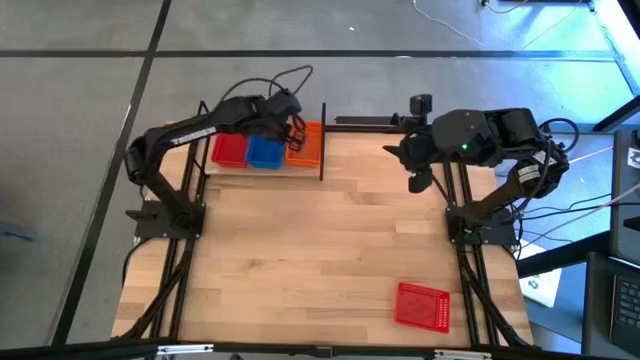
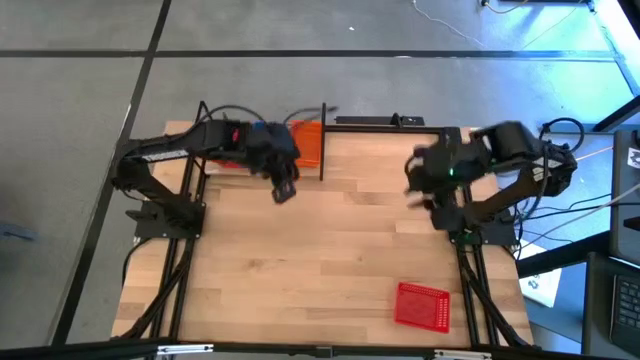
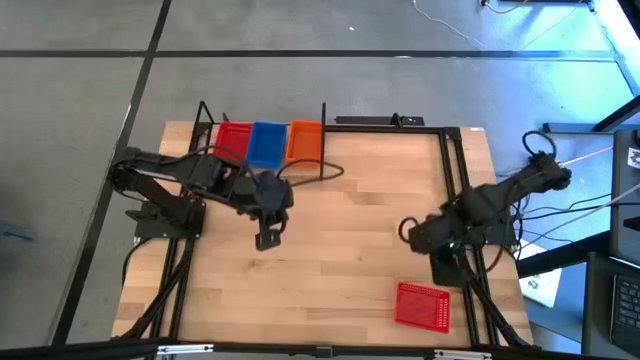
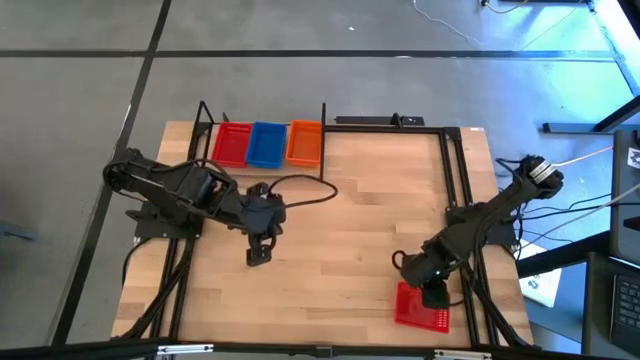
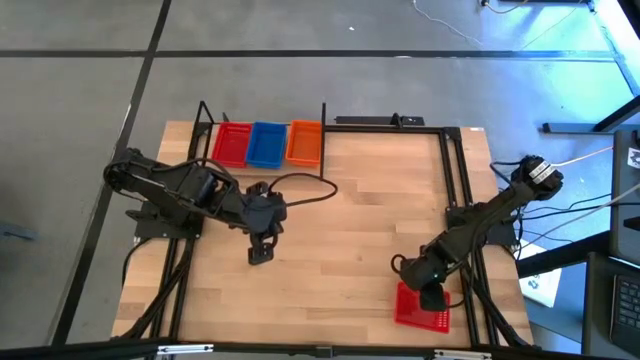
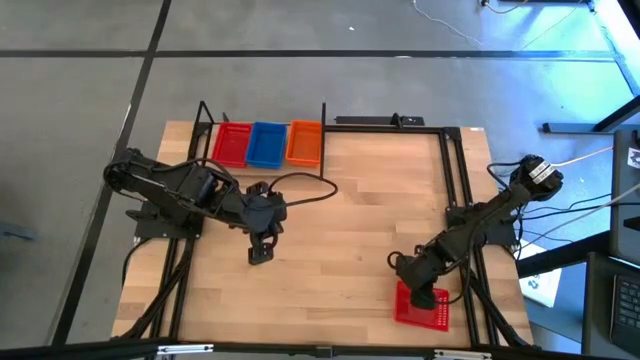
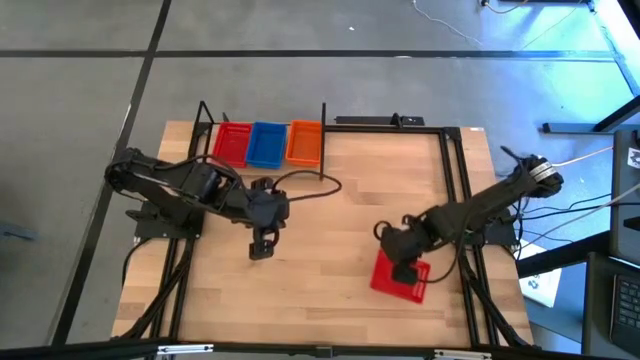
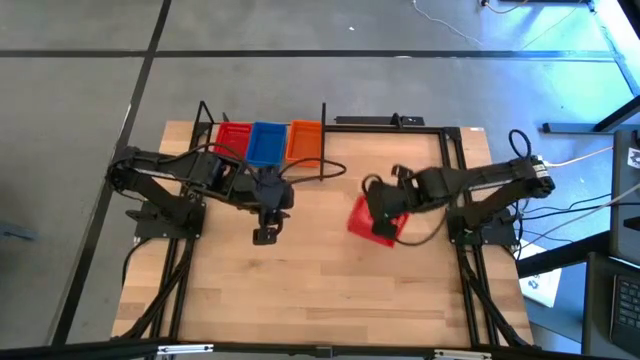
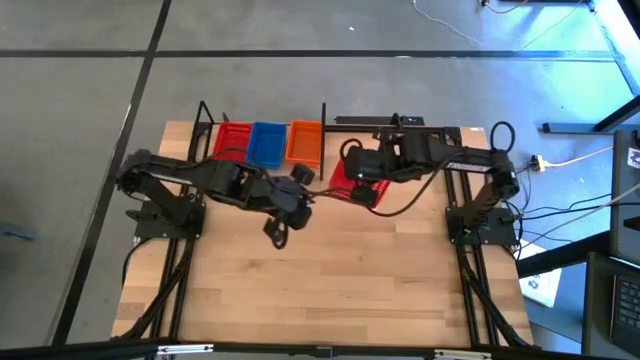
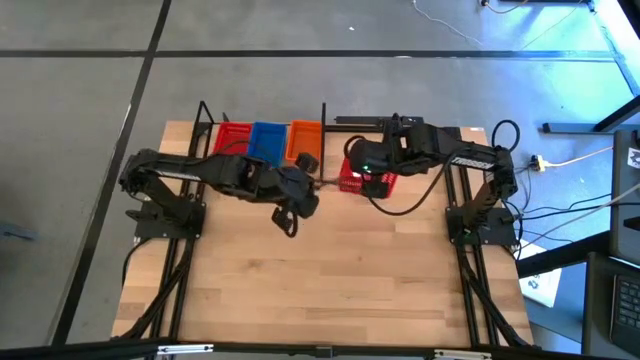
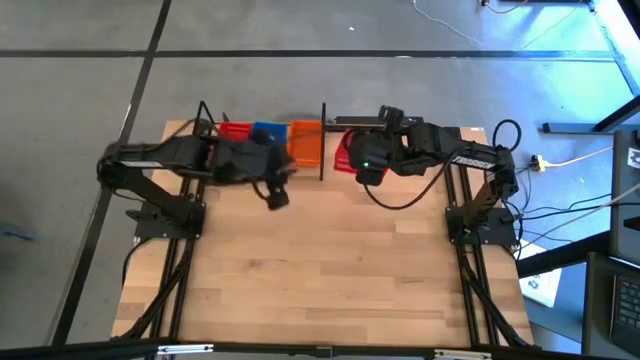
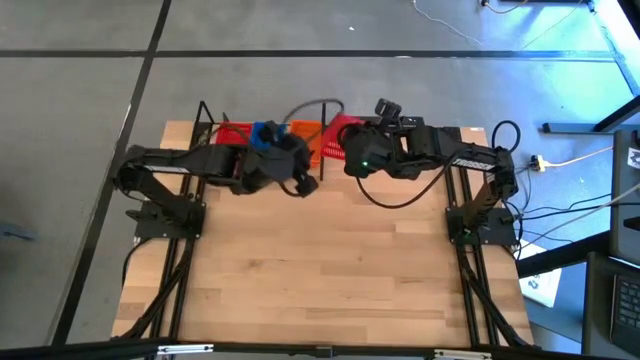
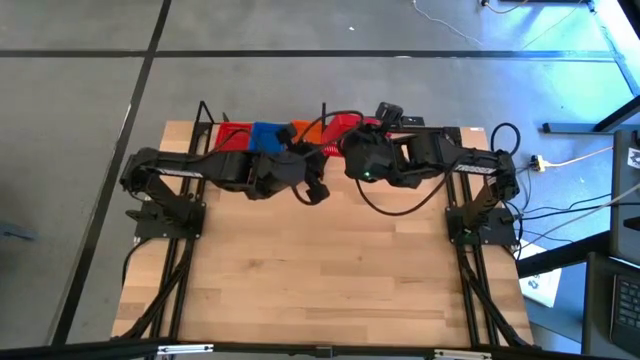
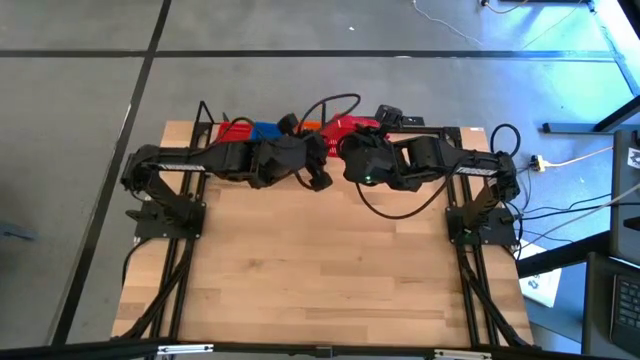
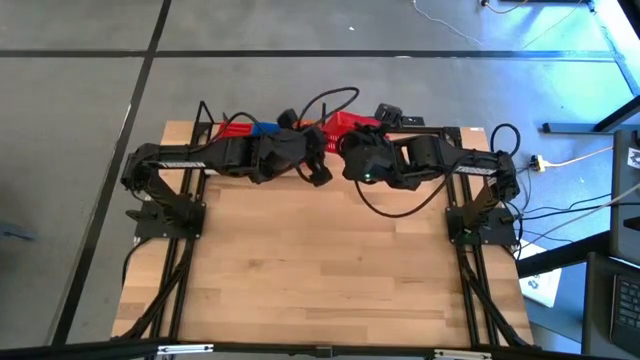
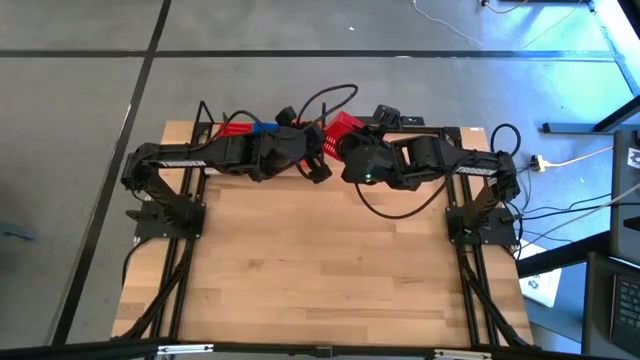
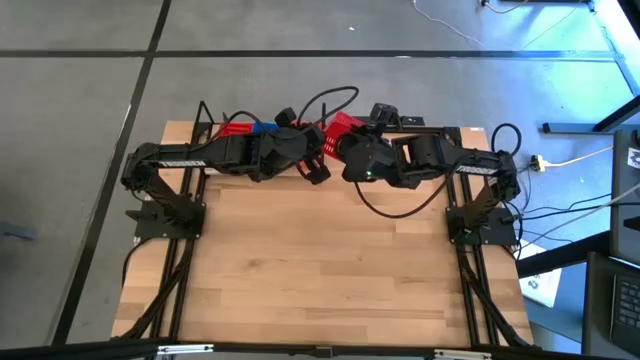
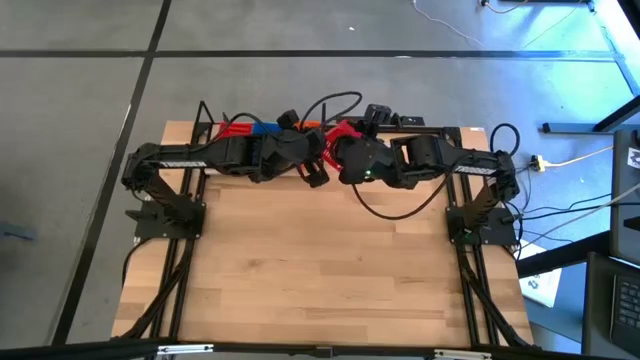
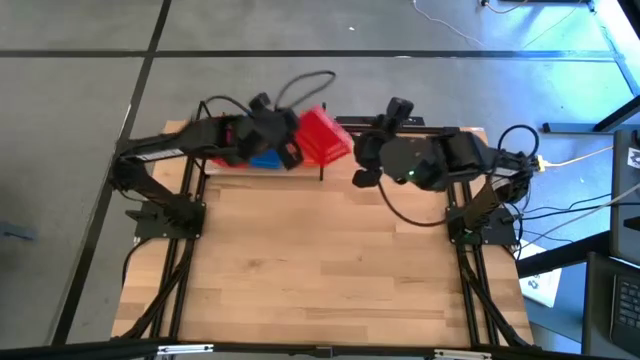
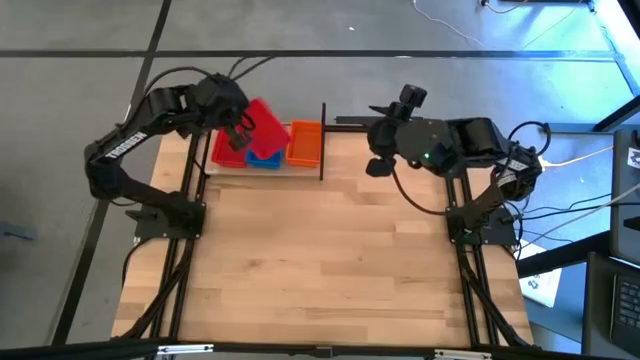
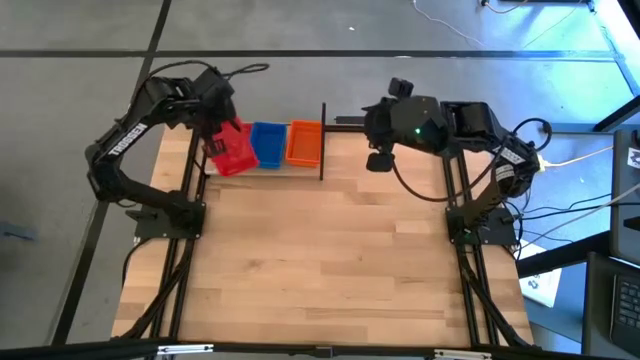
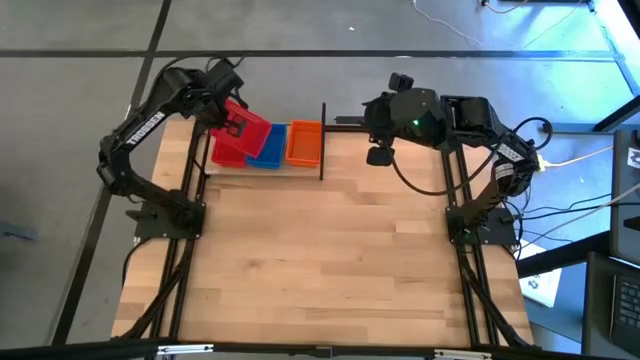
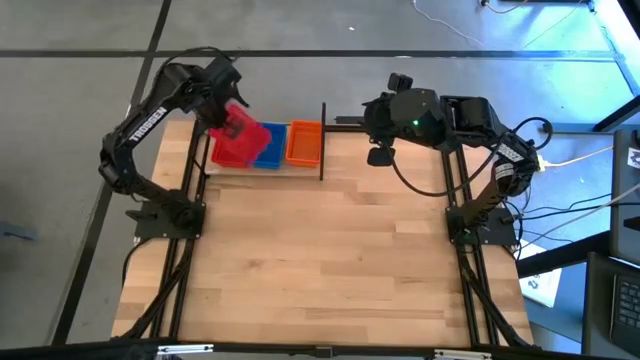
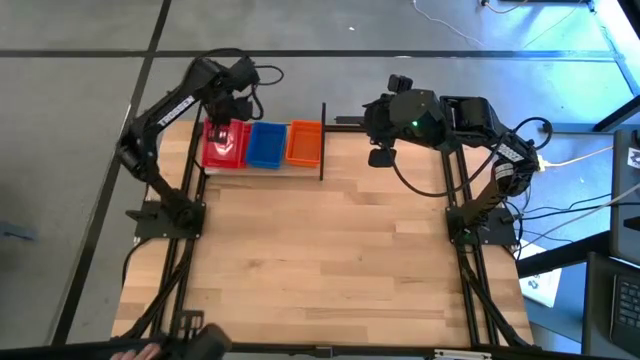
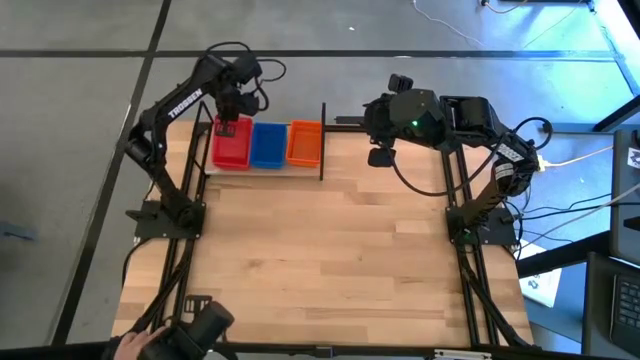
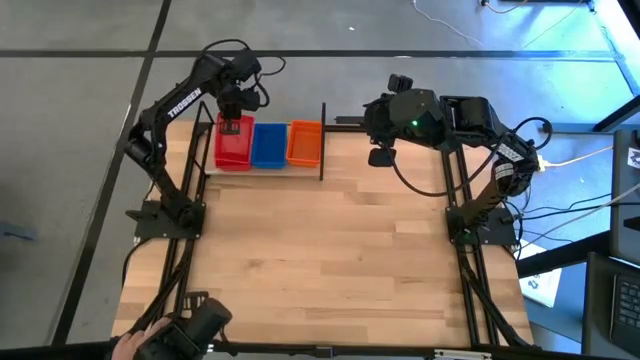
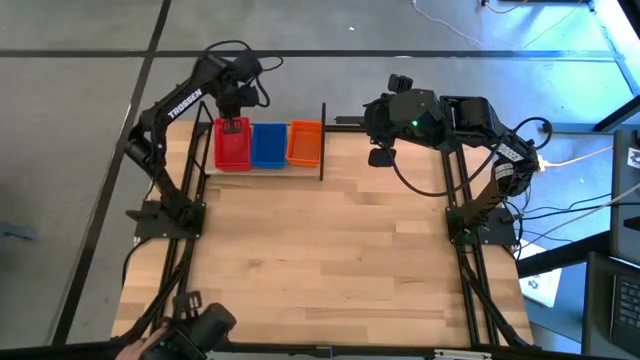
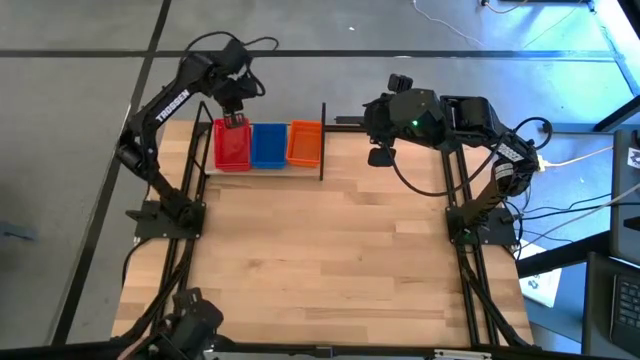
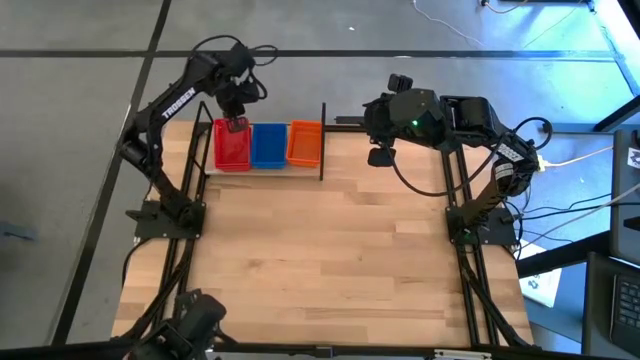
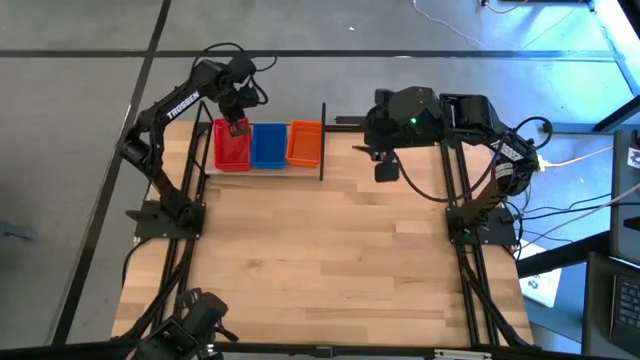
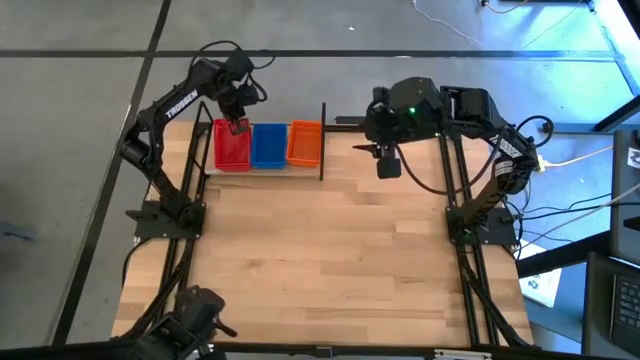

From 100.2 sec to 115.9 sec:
Task: Stack baskets on shelf by color
Stack the red bin on the red bins on the shelf

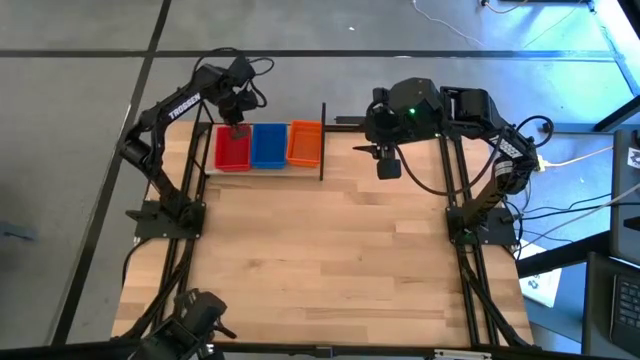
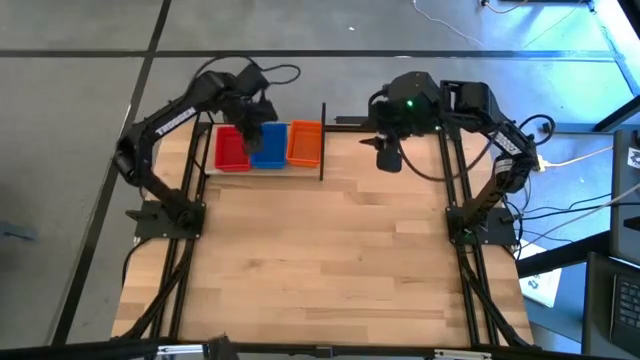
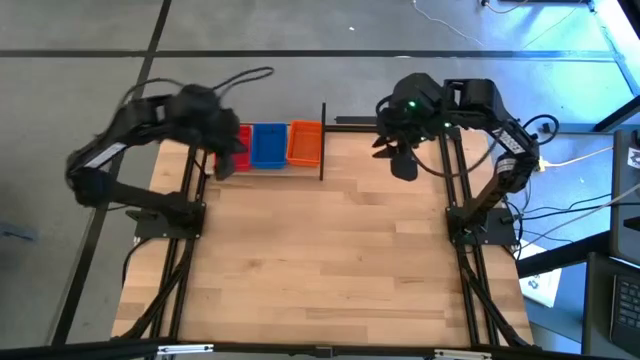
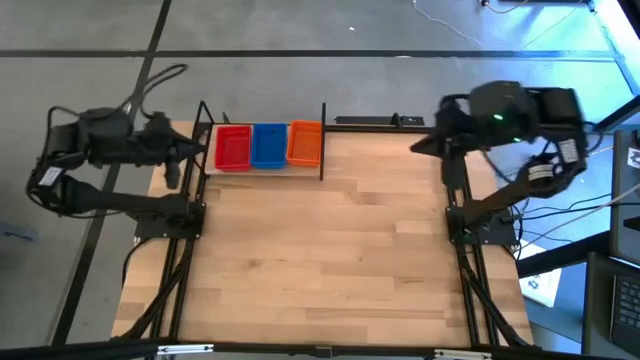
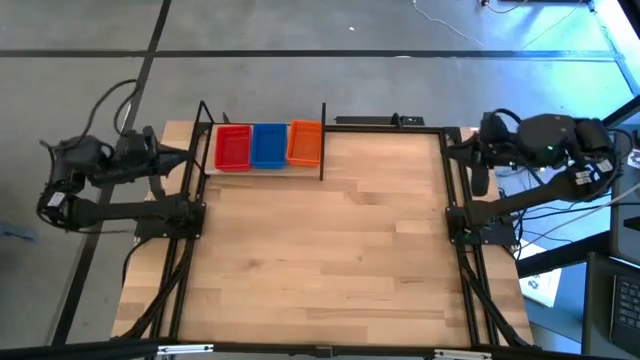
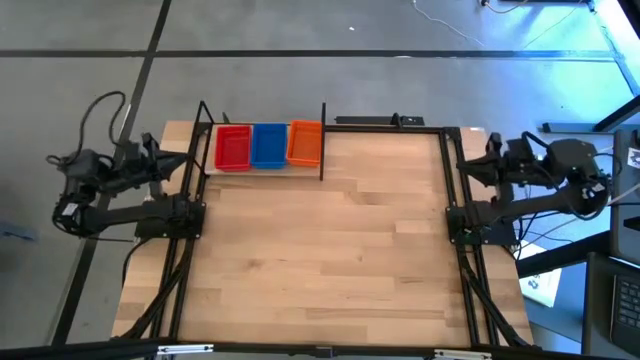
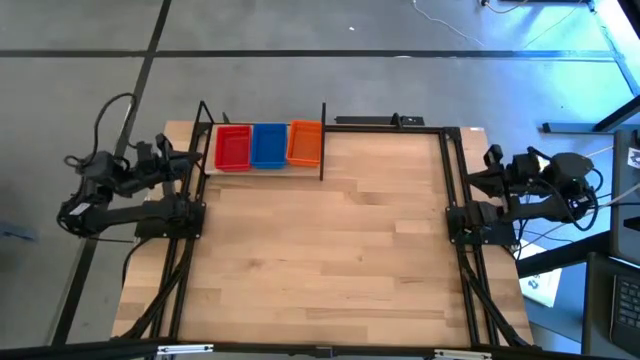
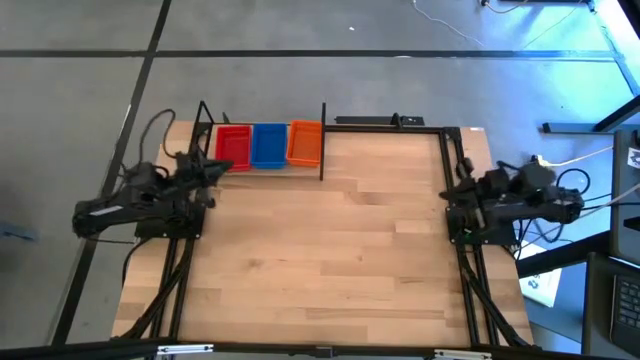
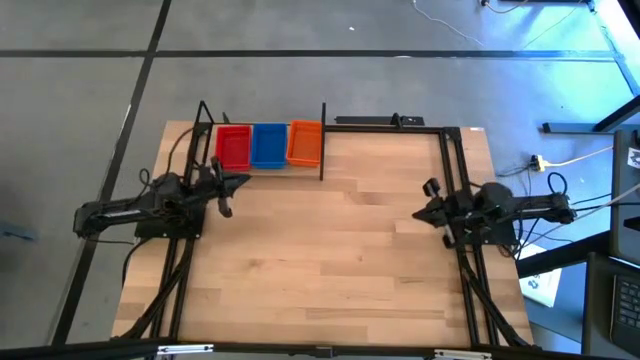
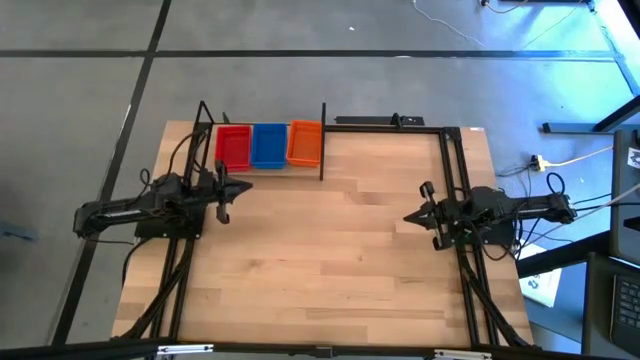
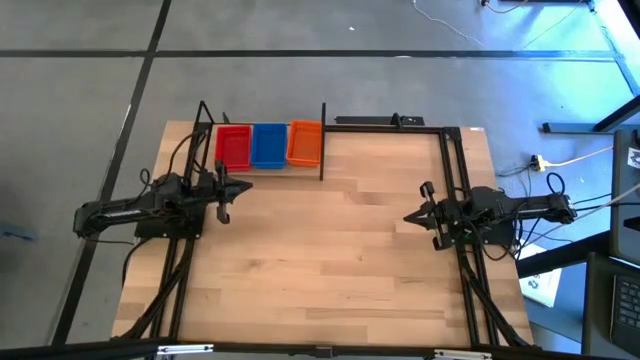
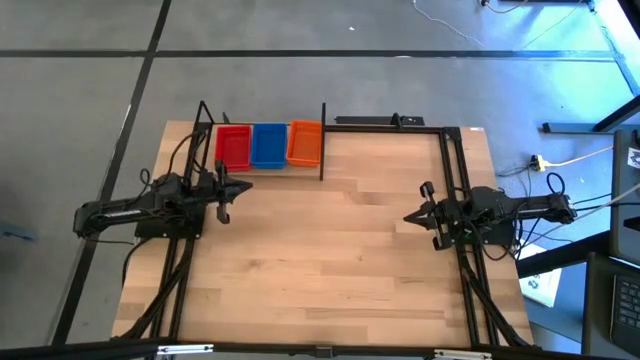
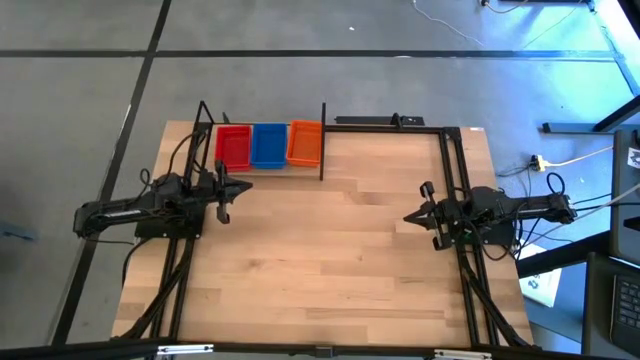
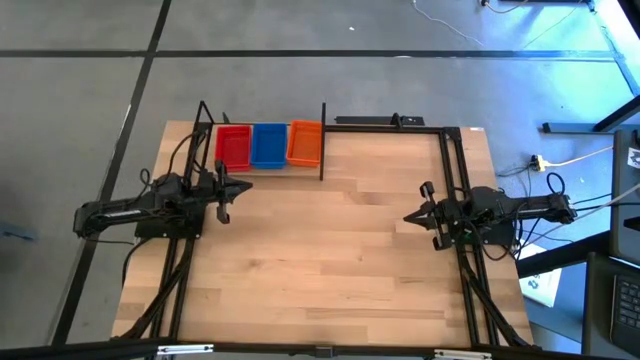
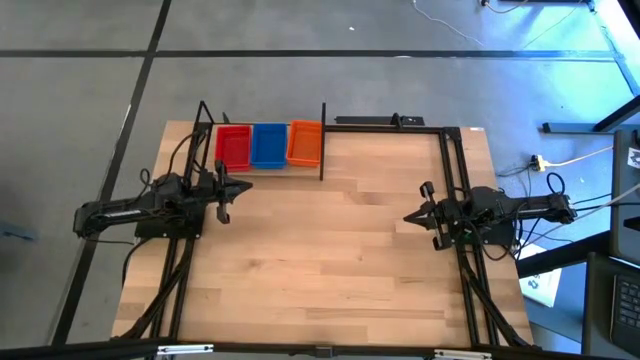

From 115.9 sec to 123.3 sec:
Return to Home Position
